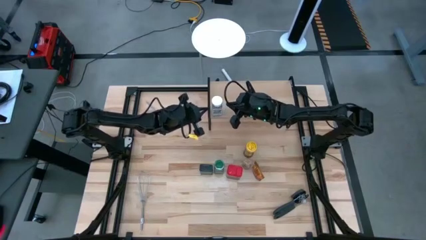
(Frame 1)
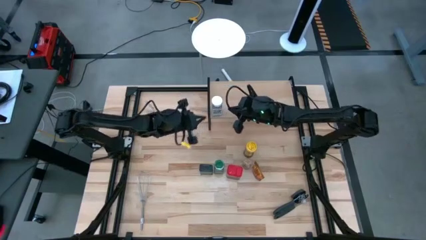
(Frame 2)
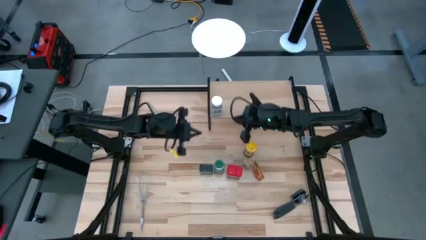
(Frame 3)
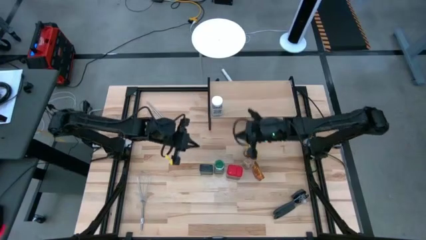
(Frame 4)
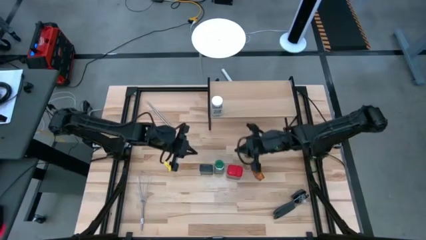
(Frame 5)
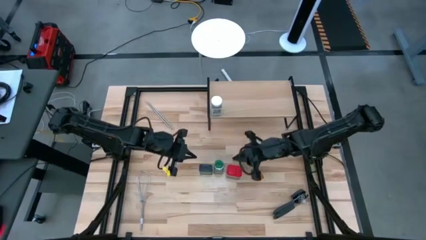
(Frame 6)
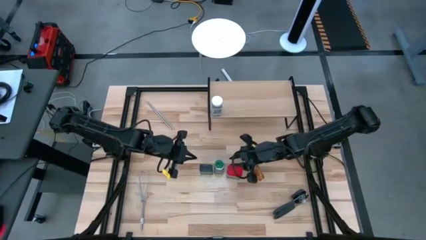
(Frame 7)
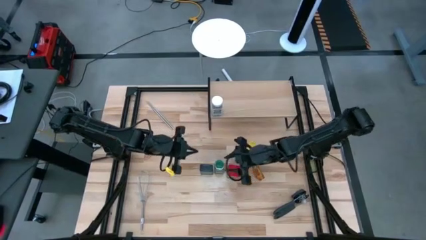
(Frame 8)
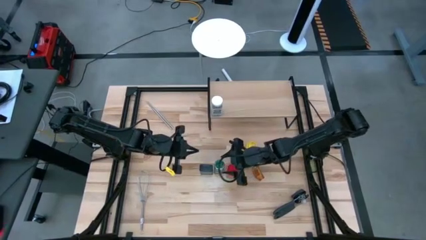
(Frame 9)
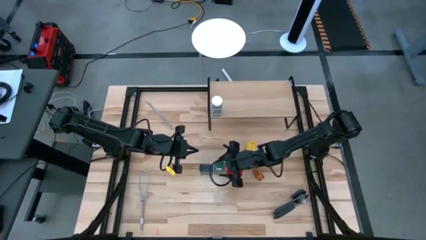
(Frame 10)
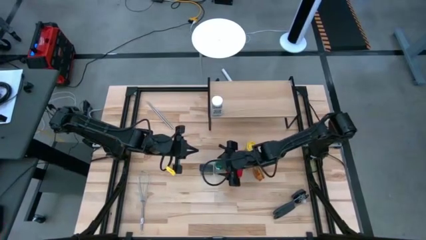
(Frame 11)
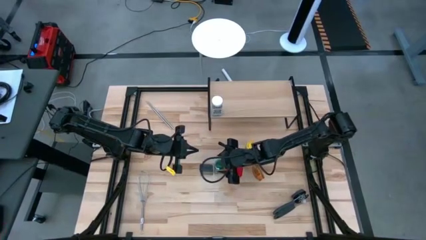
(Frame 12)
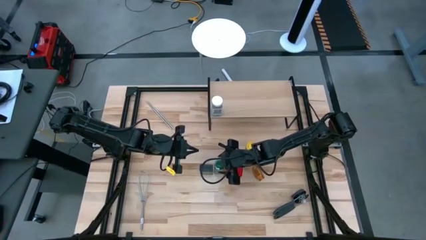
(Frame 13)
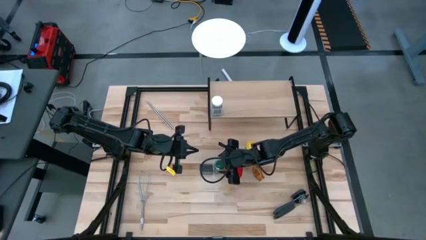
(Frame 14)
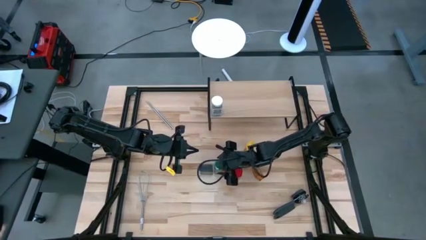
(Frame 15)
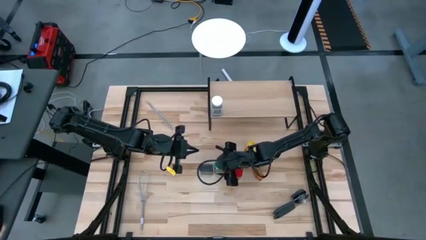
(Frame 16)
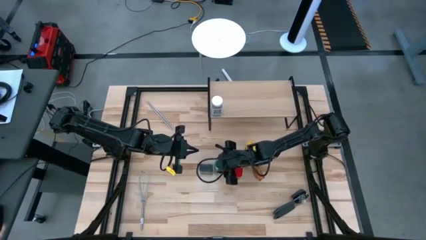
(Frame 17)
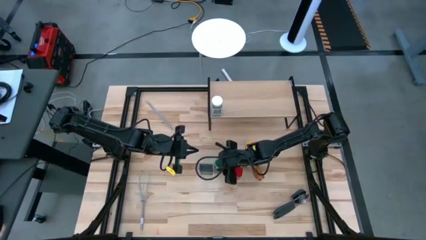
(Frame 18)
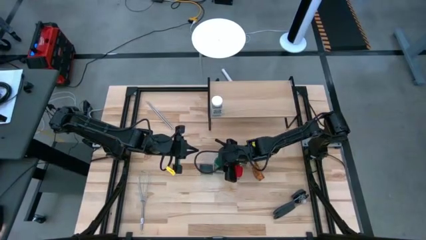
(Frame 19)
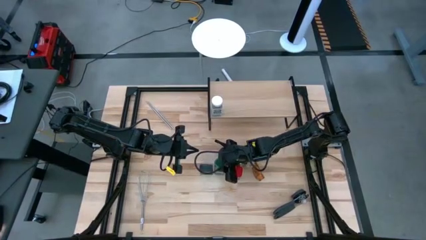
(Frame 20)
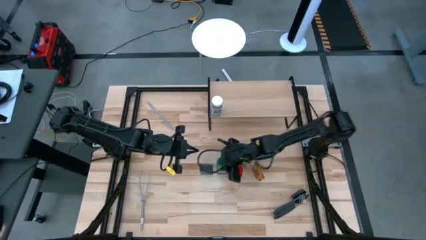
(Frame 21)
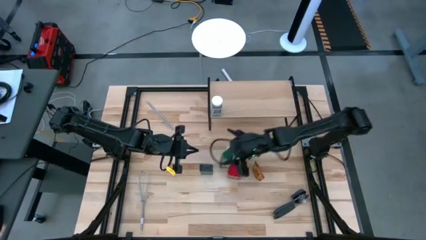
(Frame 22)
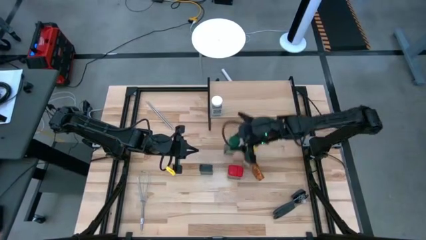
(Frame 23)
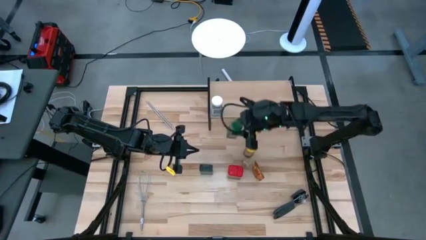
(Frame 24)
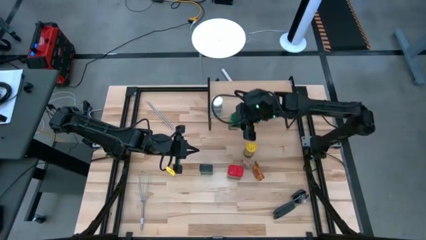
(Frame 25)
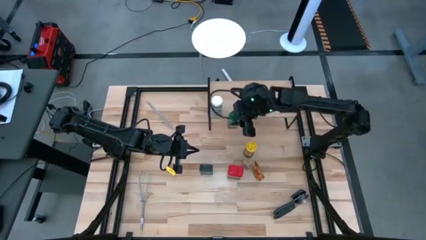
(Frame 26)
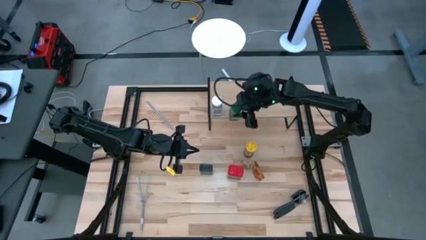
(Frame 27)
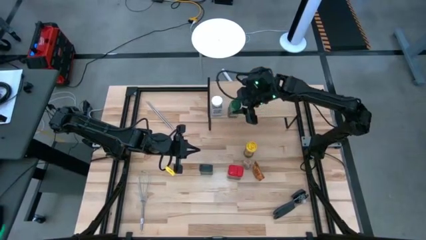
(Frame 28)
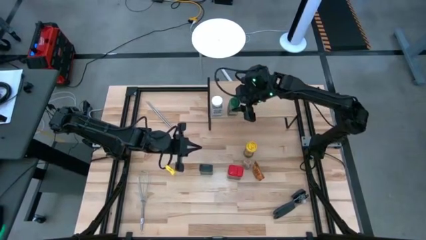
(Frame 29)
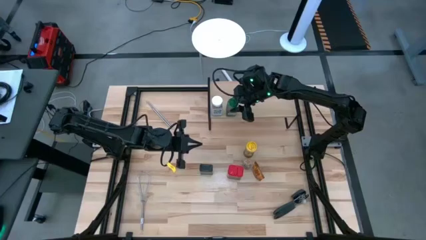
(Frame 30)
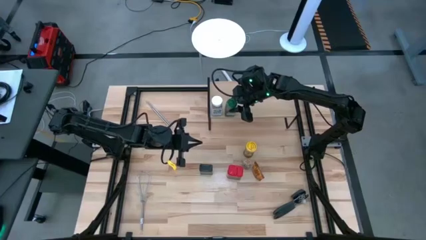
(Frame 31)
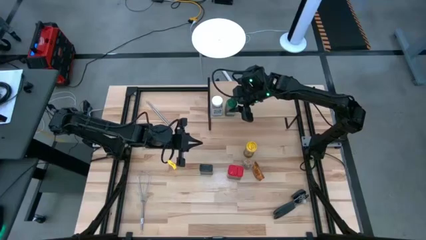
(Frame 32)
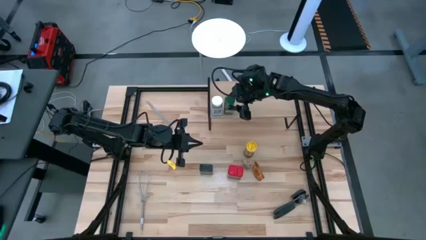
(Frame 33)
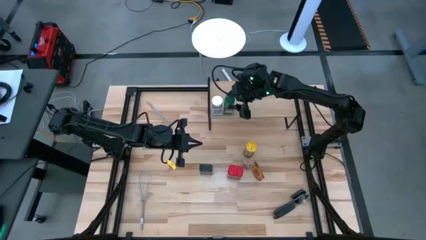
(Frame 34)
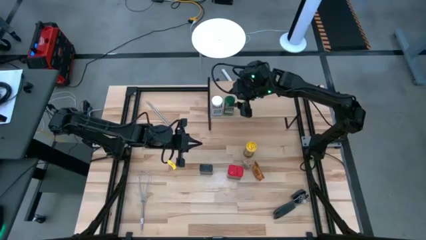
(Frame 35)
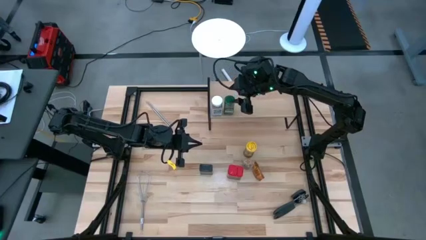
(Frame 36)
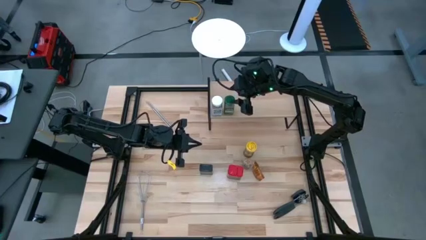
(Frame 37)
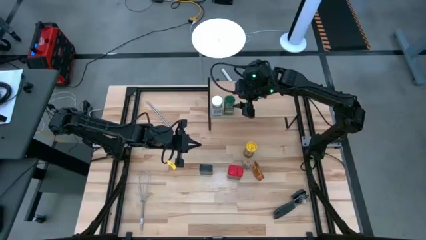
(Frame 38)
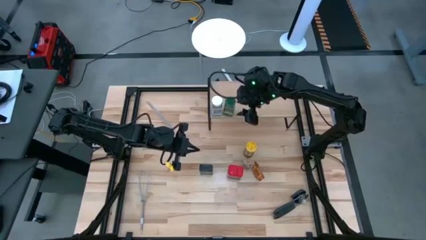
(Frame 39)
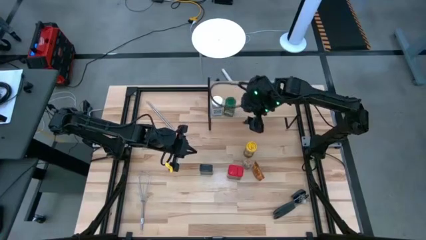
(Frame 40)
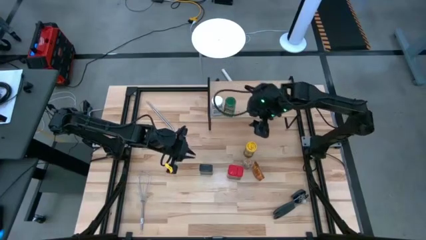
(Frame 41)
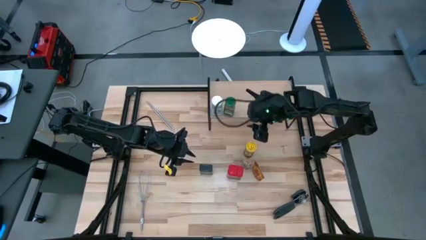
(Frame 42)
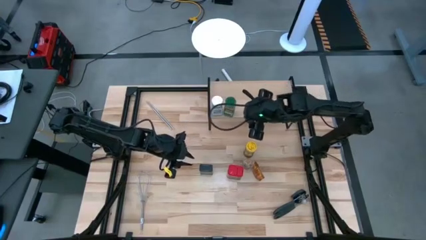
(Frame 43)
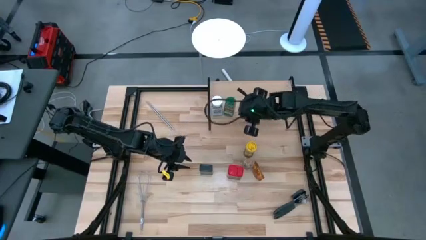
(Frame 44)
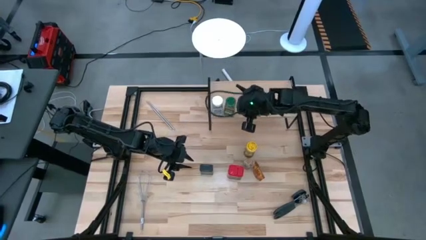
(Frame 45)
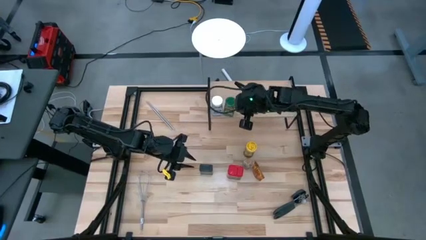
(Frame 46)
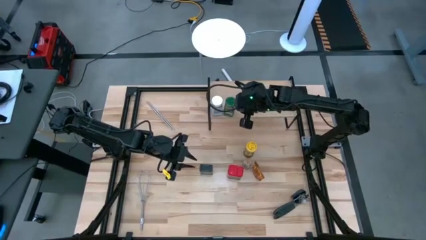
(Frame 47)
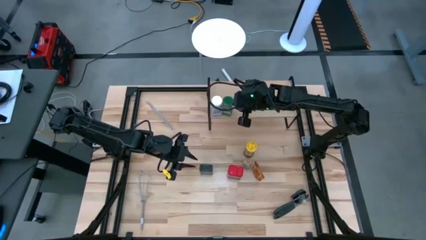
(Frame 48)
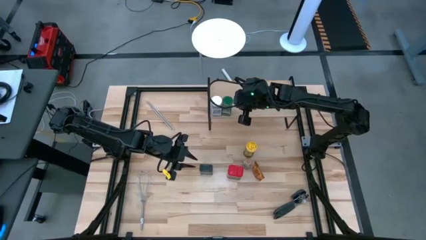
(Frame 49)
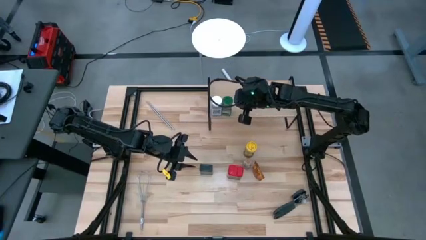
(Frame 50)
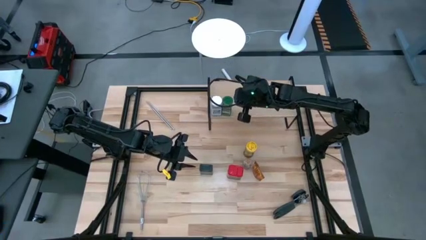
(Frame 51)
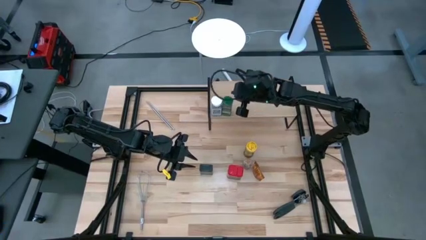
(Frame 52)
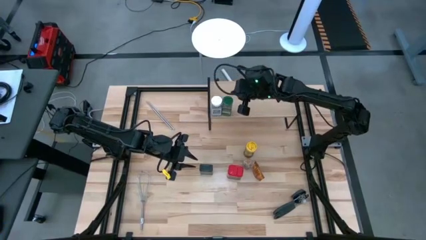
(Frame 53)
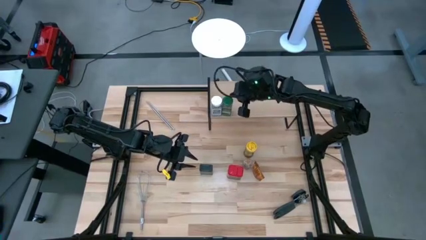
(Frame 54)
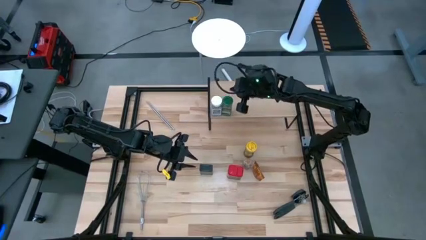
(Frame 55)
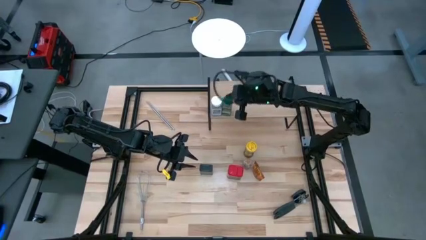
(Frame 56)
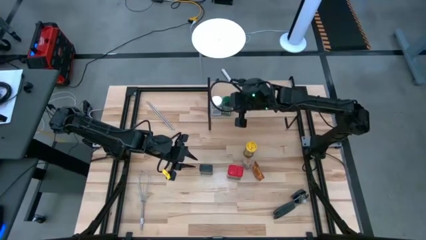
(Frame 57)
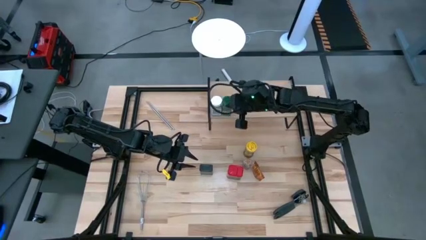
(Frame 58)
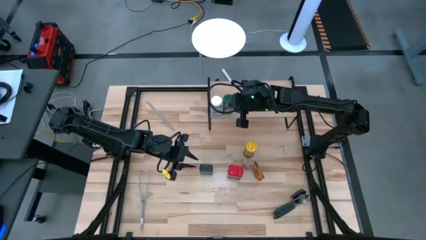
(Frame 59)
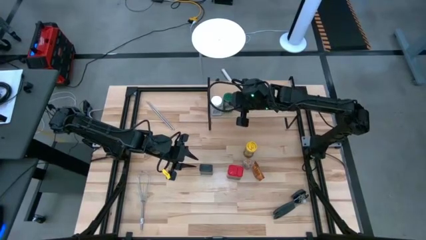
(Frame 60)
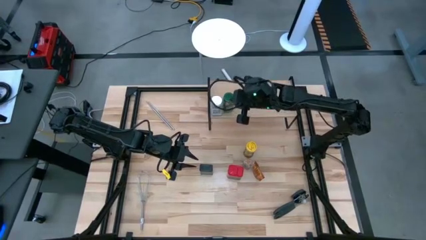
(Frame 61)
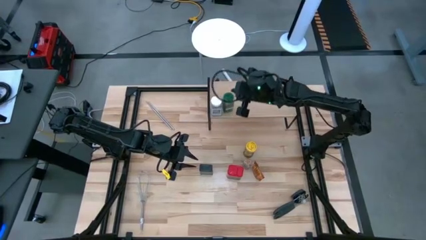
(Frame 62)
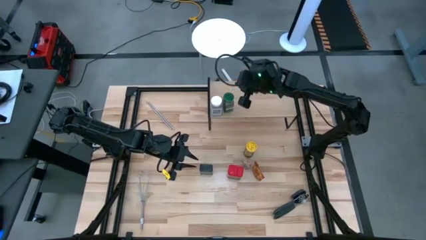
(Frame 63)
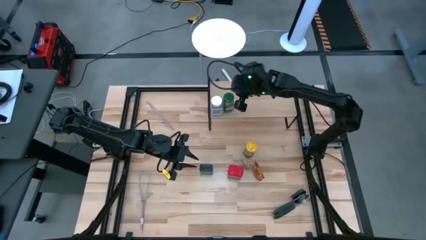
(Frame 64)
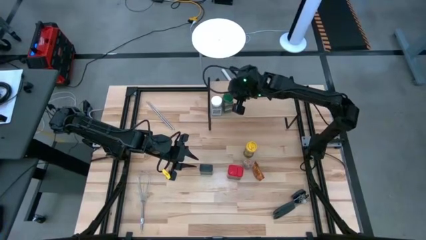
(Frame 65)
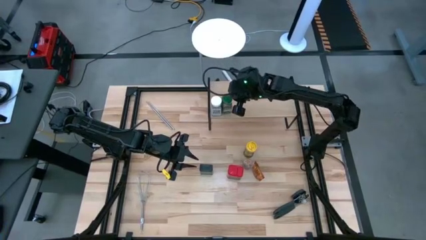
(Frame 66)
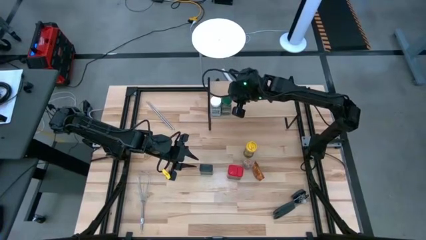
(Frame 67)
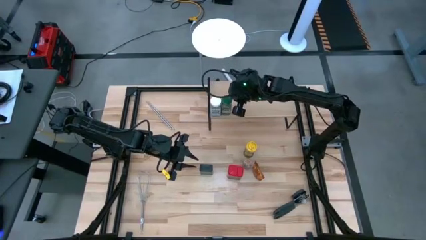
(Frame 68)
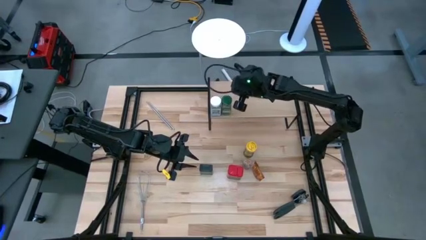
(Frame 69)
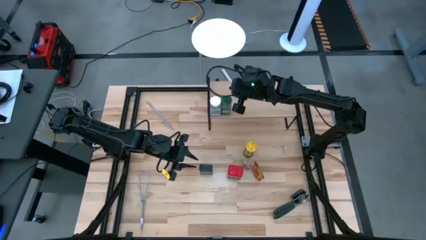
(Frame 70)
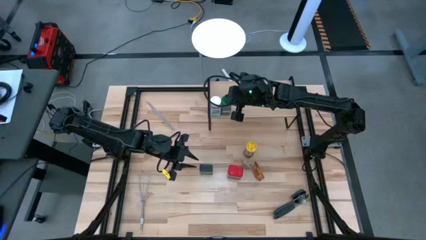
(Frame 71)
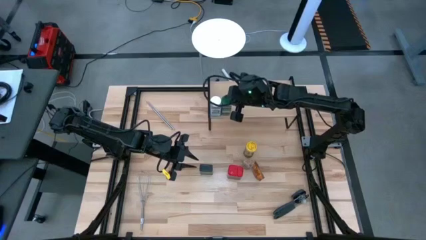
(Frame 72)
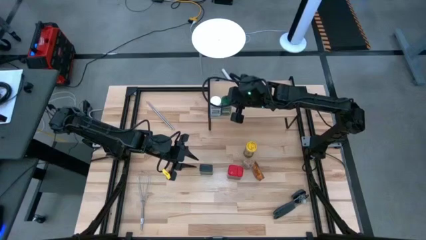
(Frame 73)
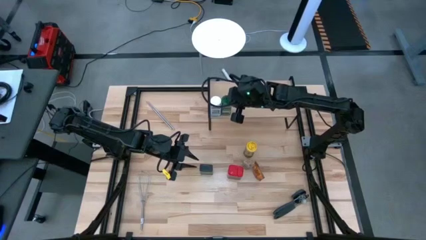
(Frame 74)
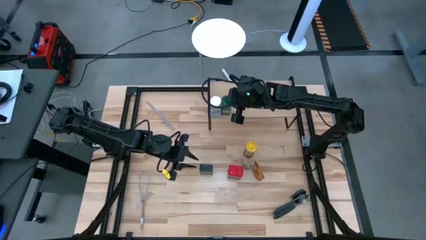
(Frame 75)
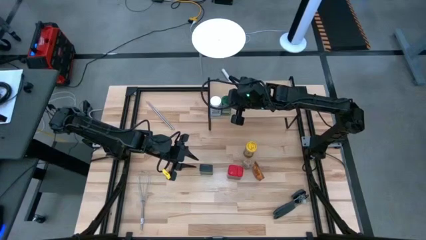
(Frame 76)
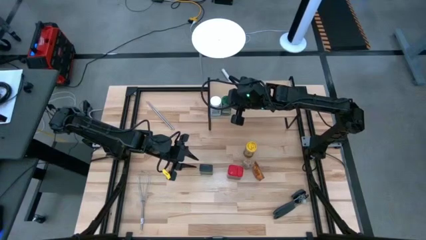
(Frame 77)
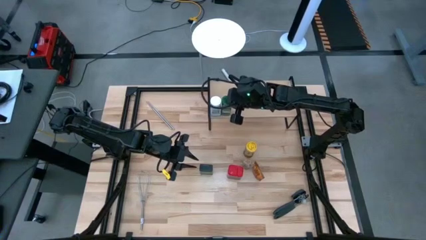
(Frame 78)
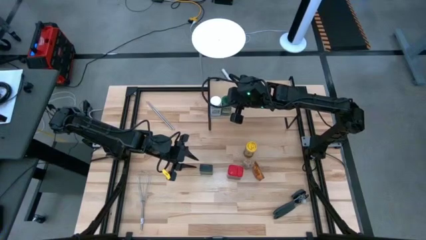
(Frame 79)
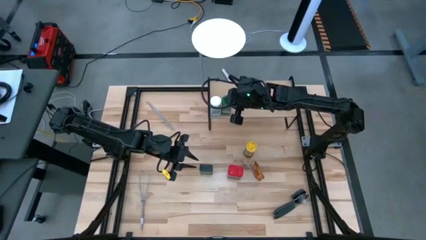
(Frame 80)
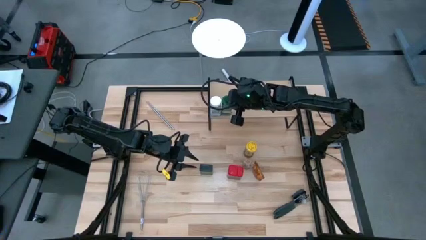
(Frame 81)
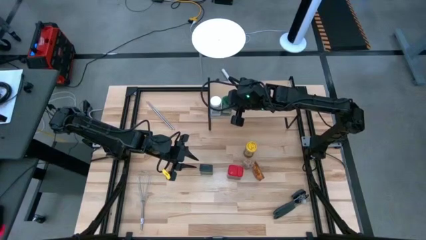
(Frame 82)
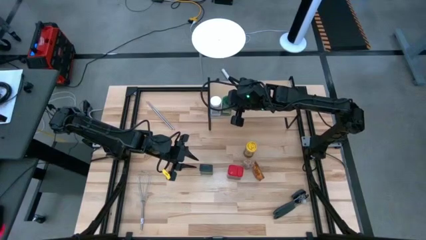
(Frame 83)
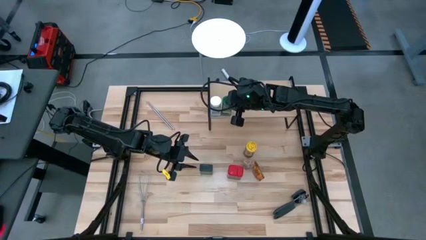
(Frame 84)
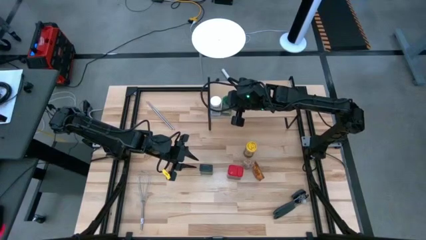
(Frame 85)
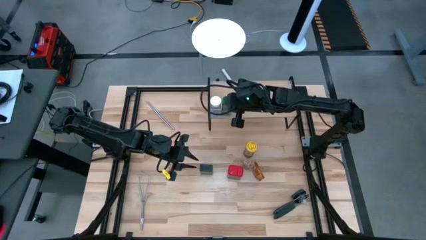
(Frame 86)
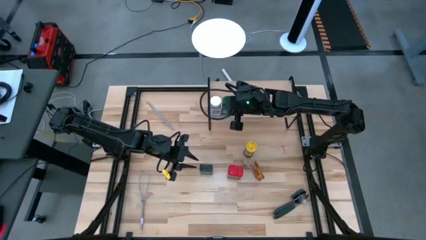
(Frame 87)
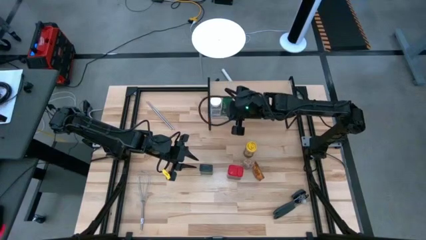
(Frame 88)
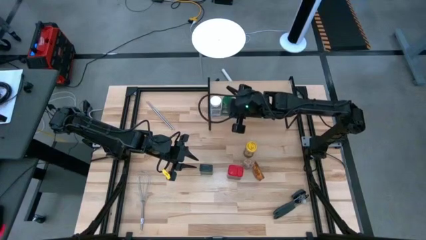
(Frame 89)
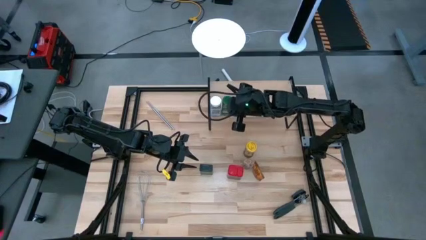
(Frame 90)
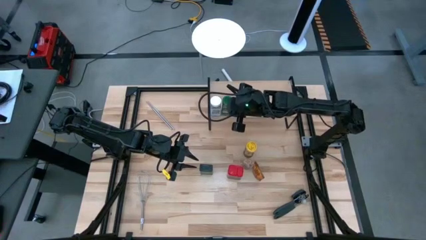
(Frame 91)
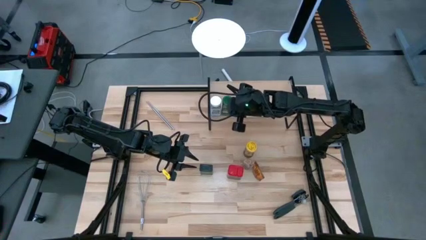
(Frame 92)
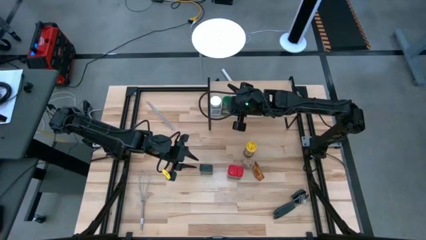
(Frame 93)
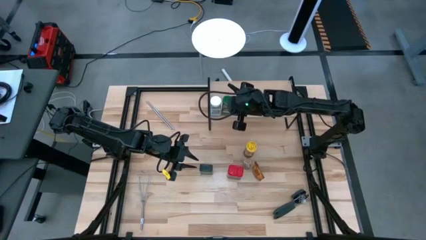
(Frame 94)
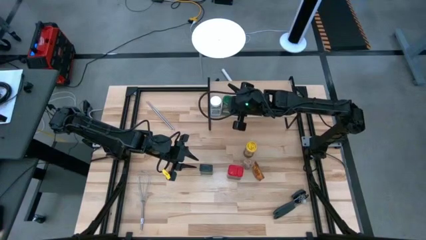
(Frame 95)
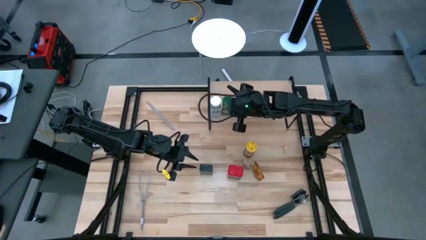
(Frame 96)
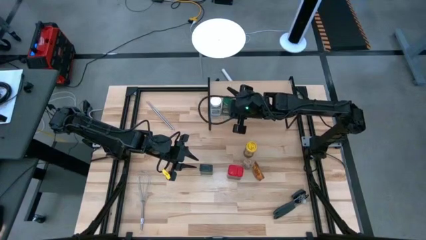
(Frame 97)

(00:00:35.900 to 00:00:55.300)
Task: Shelf spices
Put the green seasoning bottle on the shelf
